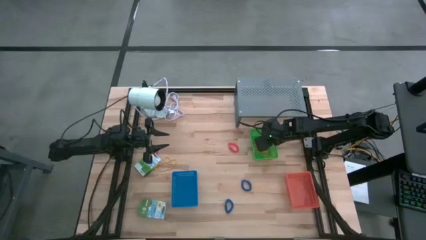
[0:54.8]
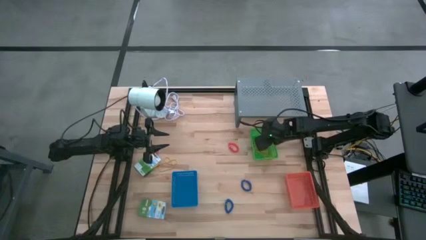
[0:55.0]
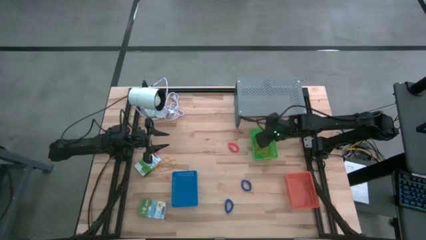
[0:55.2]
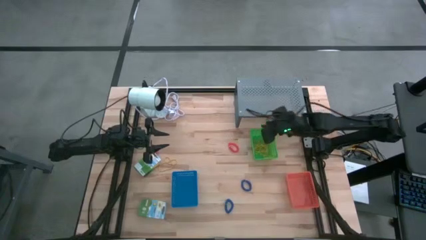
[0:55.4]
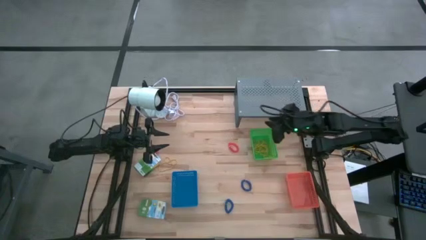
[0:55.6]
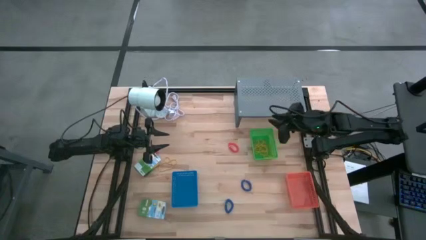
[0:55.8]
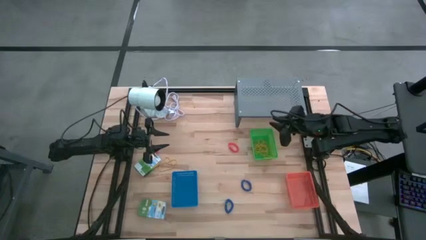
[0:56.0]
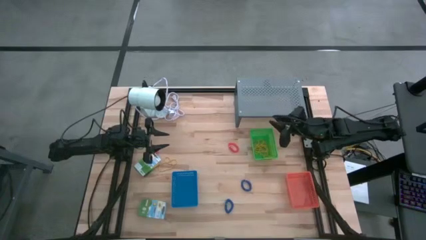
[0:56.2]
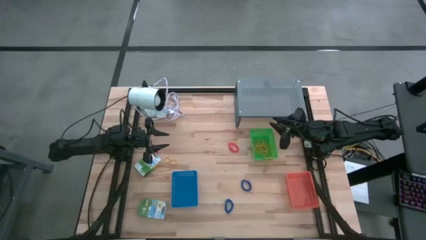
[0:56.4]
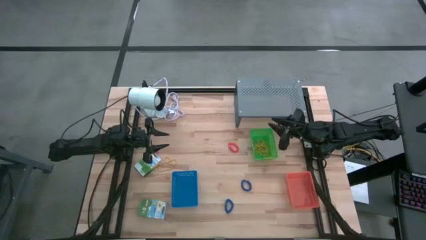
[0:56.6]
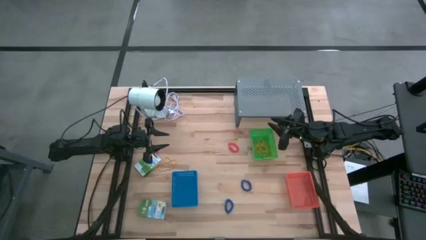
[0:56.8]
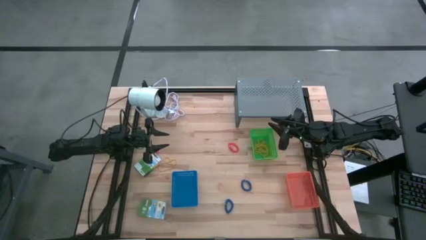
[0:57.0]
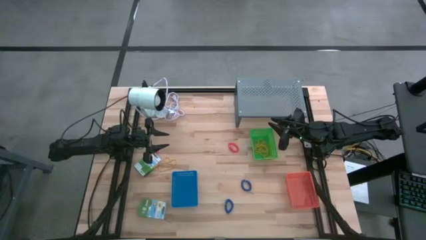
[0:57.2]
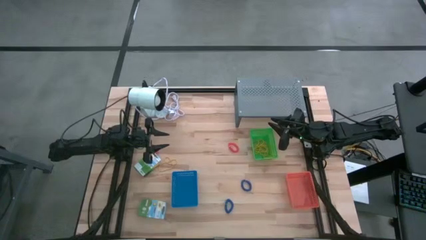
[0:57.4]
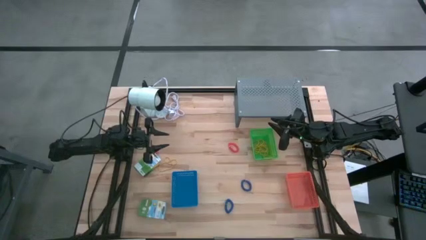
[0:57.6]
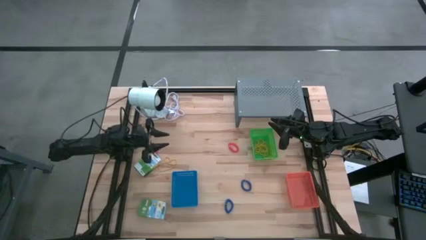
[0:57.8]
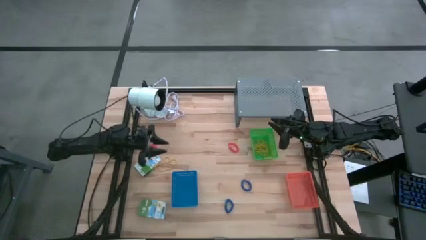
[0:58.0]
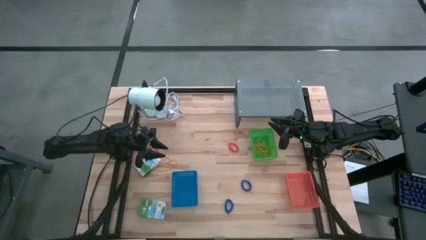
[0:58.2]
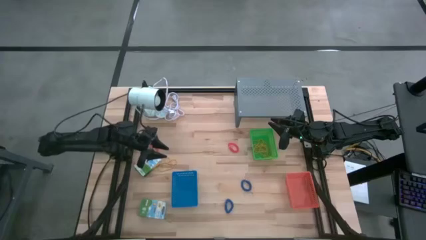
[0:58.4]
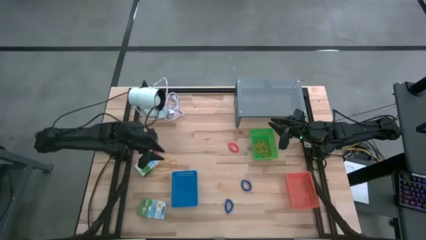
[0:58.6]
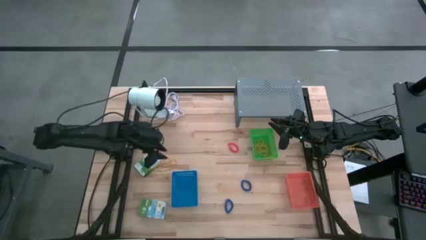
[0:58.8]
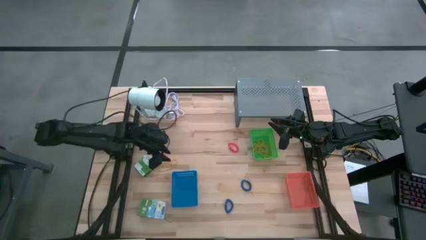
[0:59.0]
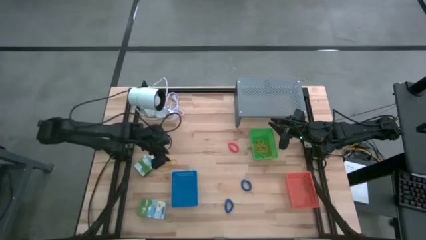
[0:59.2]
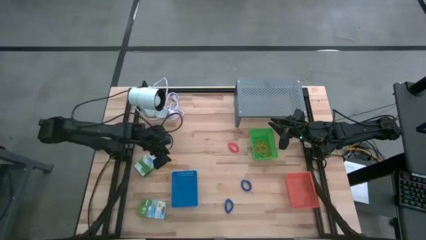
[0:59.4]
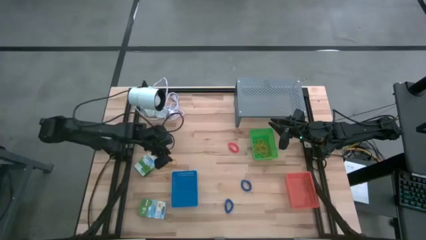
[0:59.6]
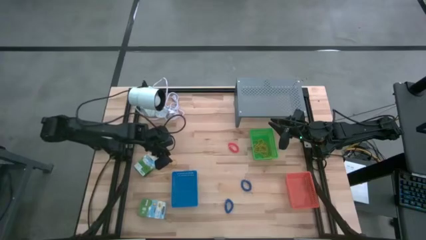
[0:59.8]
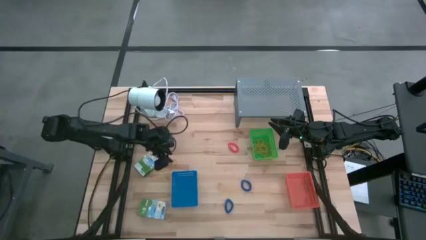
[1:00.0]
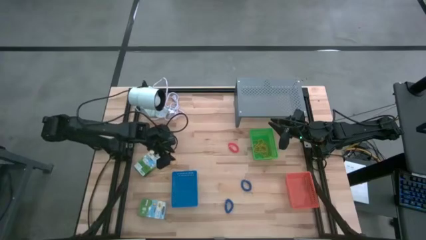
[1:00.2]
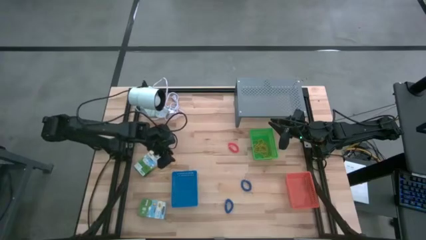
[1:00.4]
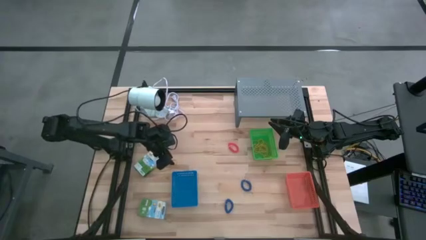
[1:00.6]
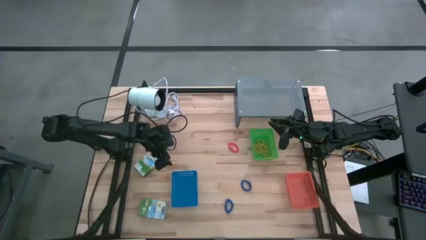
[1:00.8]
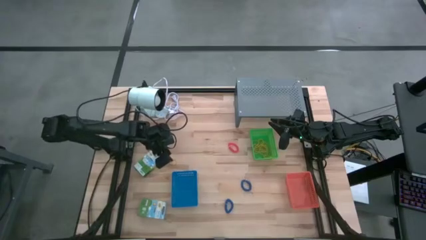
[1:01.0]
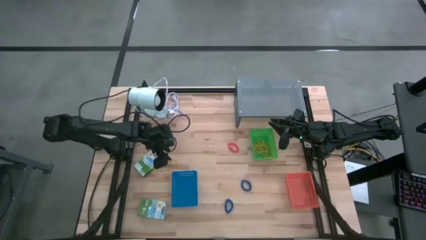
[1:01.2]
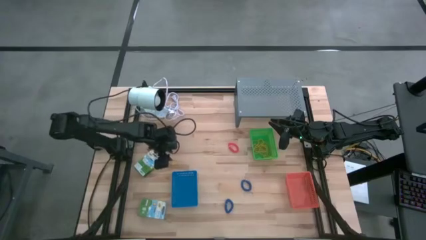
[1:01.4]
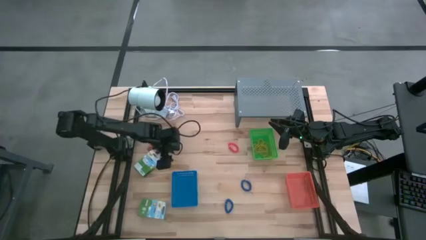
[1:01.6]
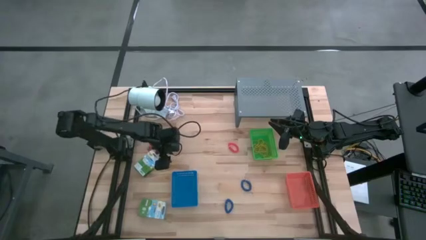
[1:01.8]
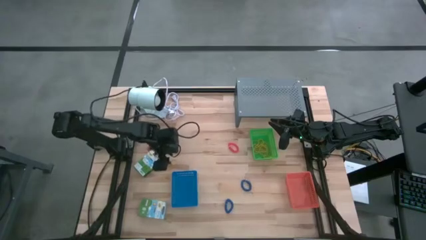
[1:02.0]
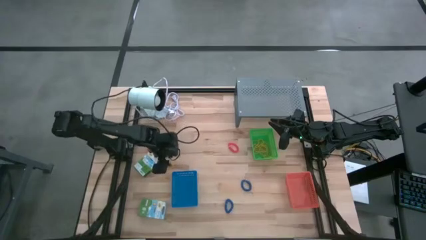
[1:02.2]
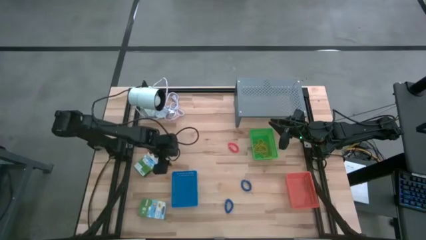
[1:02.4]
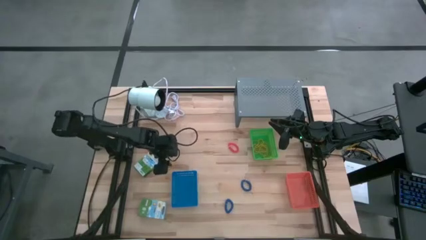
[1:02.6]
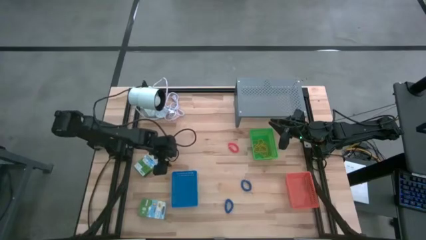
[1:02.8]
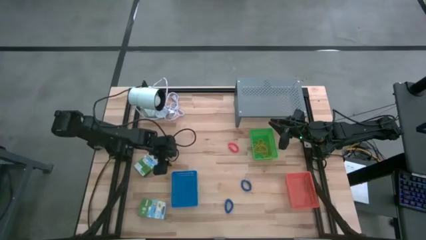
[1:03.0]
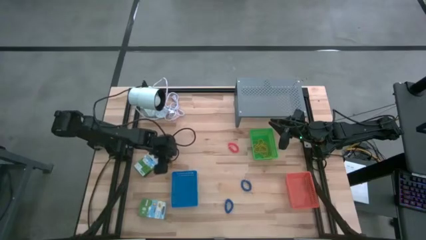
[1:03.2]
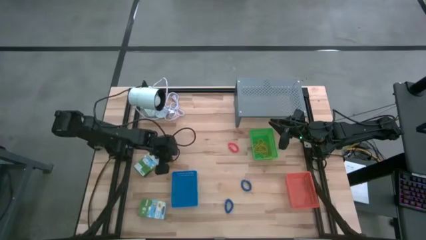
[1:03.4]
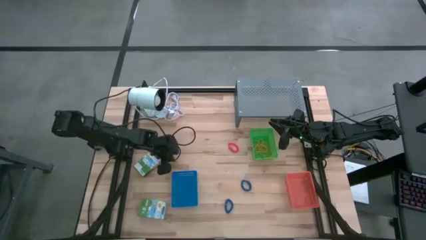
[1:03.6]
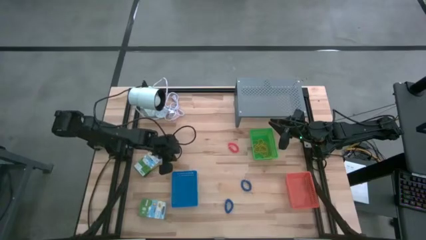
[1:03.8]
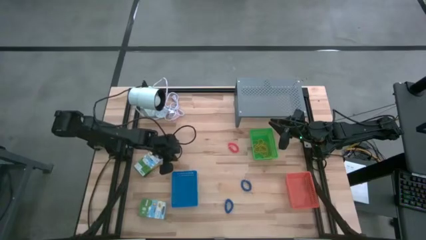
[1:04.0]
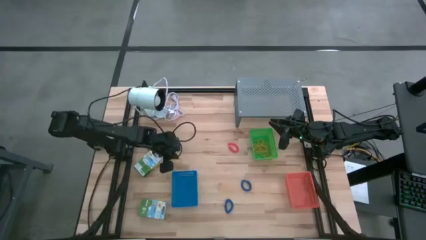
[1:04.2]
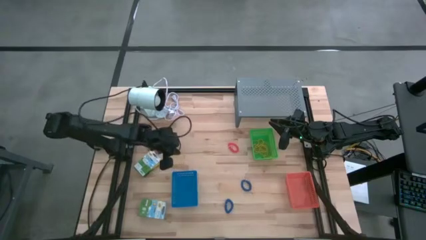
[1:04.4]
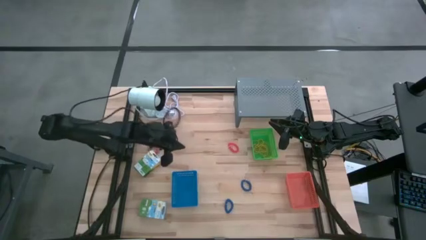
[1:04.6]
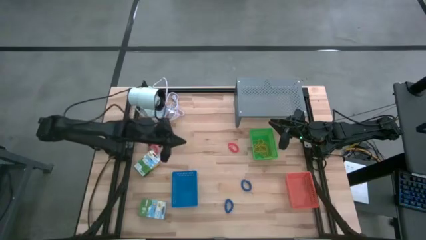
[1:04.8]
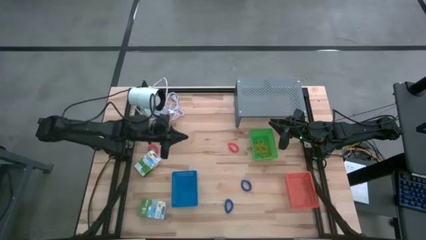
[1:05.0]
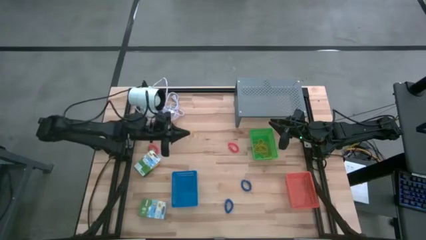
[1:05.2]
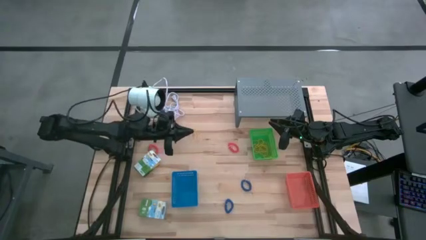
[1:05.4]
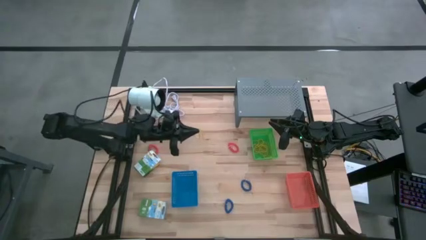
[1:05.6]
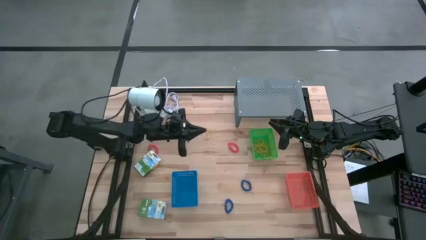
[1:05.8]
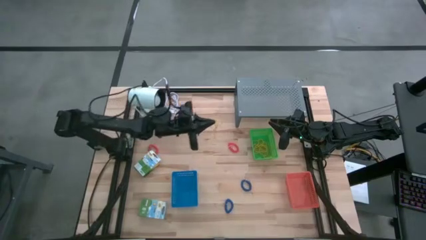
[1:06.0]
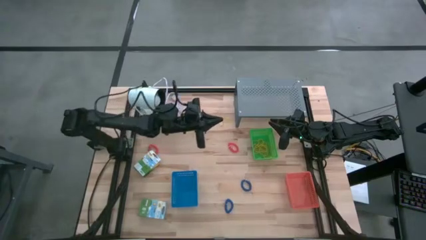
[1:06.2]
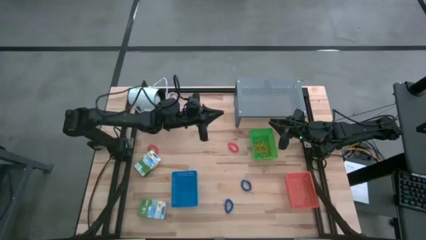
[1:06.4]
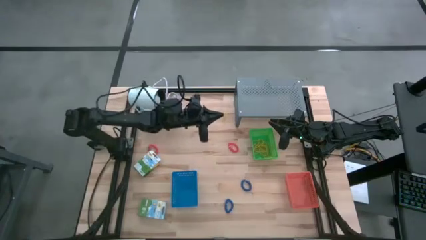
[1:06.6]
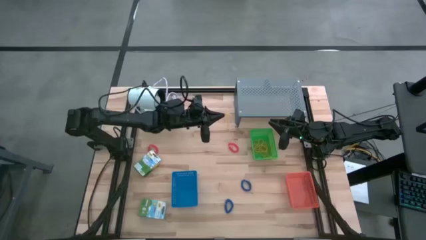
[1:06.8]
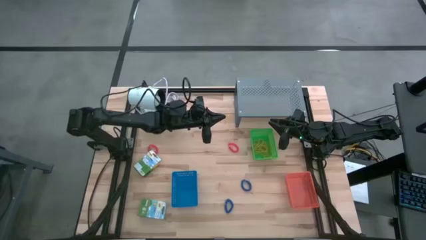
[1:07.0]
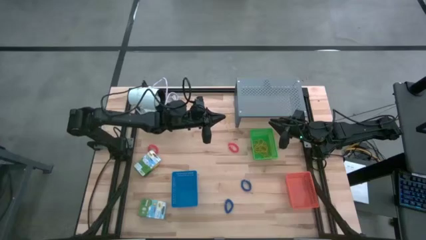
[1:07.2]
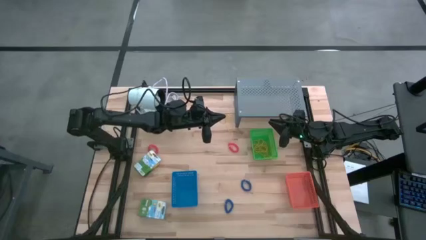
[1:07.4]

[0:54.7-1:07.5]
Task: Pick & Place Office Desk Supplies
Put the yellow rubber band into the green bin

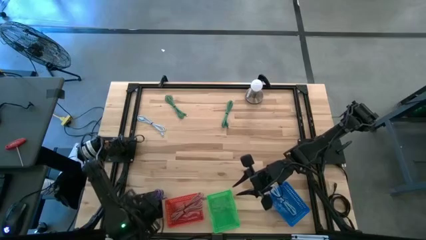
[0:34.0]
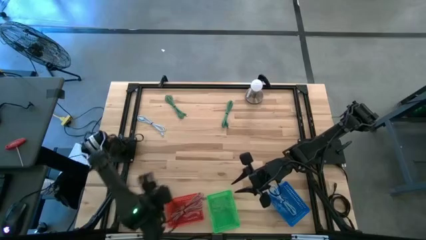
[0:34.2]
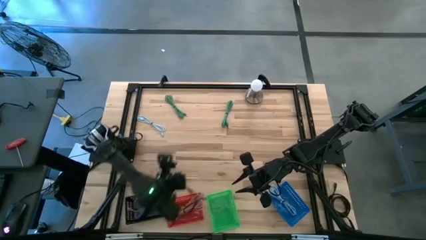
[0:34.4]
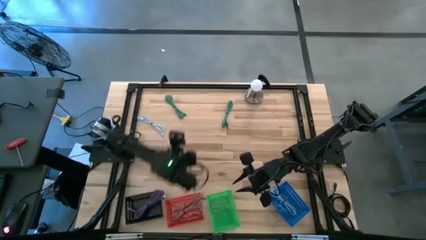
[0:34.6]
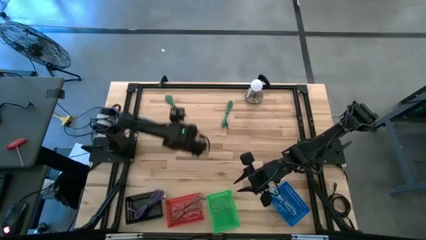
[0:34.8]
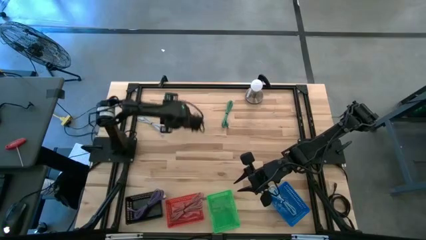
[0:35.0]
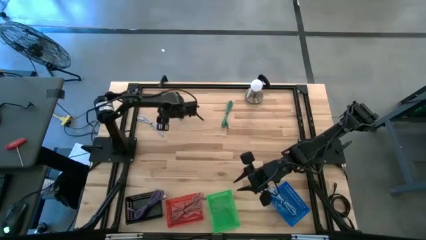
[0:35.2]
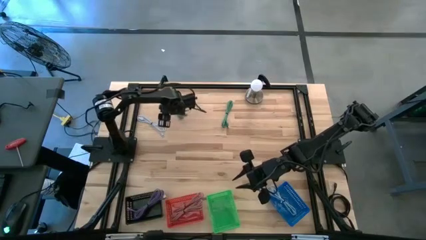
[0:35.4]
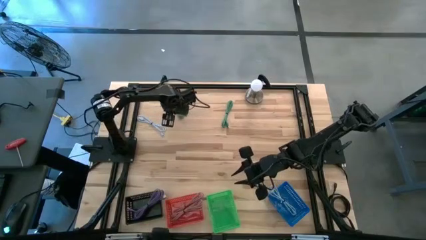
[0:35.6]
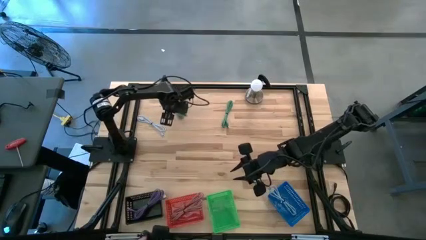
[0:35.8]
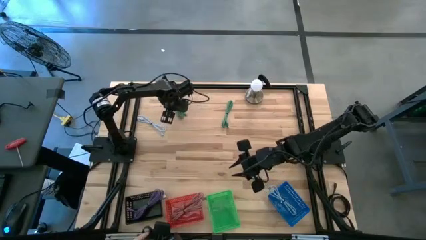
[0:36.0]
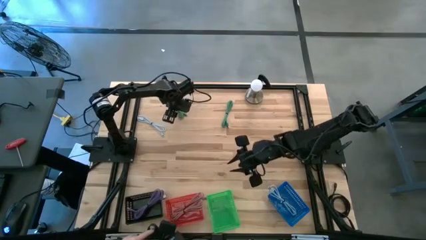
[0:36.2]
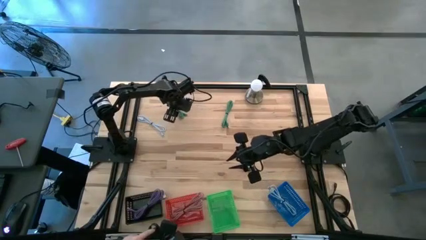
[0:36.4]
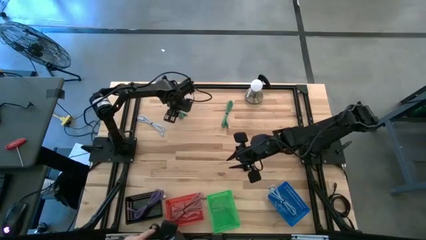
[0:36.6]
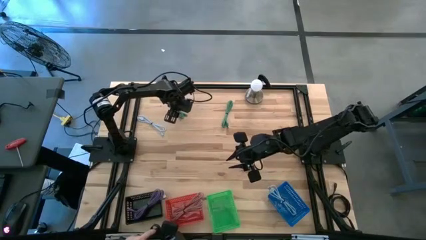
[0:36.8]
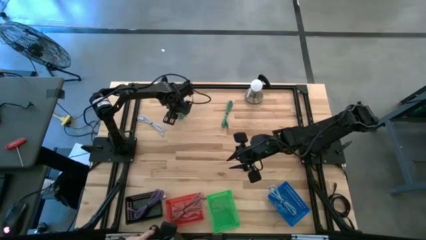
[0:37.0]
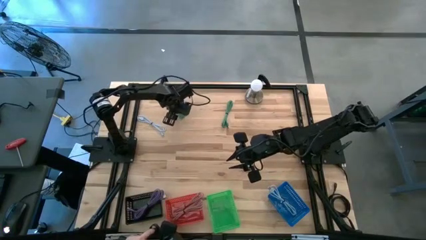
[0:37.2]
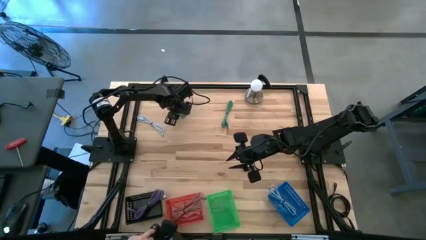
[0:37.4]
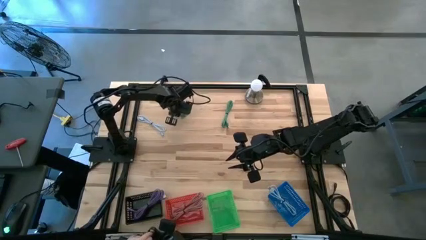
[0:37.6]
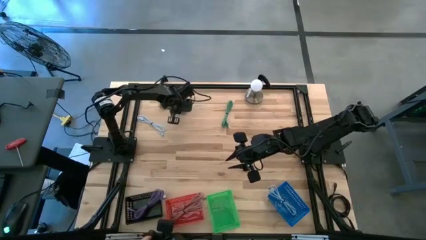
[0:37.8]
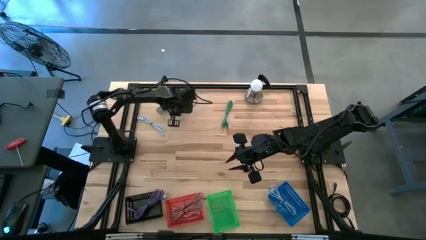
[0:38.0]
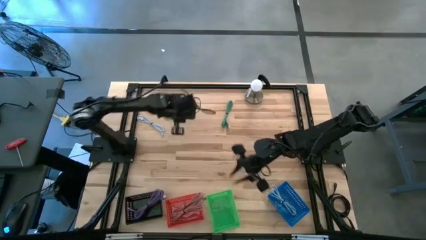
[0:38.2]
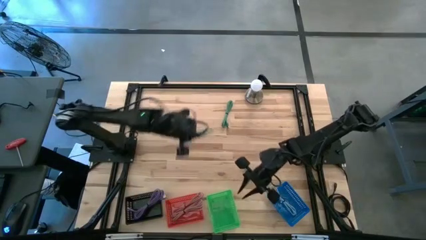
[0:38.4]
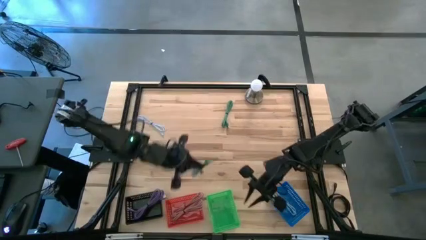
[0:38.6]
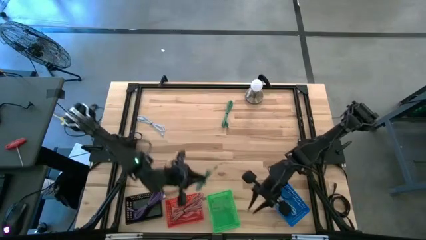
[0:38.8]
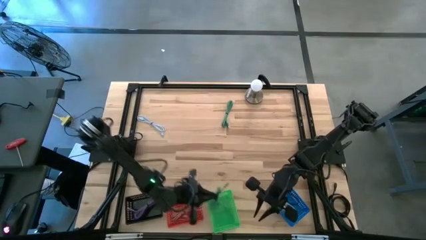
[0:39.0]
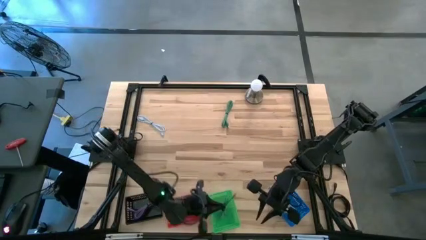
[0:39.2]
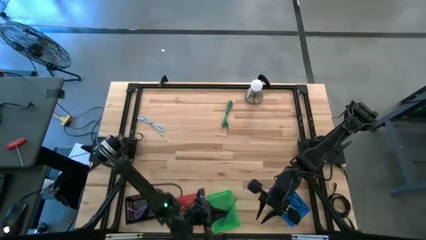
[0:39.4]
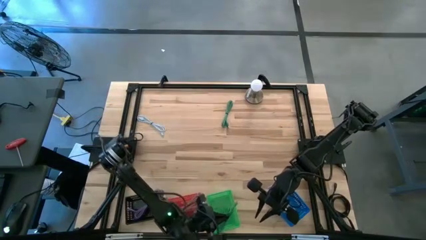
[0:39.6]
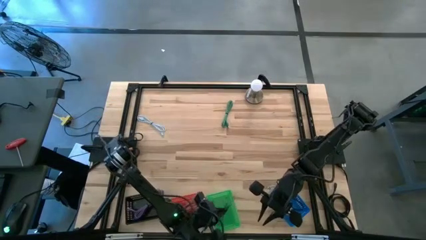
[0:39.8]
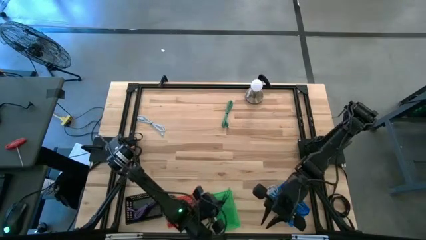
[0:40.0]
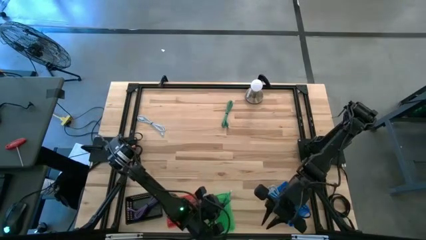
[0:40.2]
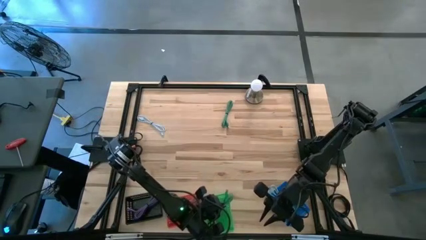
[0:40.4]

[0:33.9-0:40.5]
Task: Pick & Place USB Port
Put the green USB charger into the green bin
